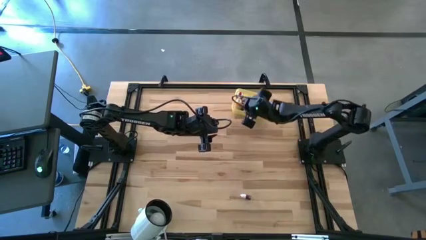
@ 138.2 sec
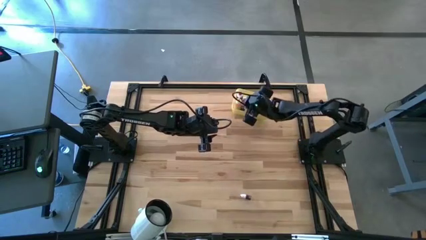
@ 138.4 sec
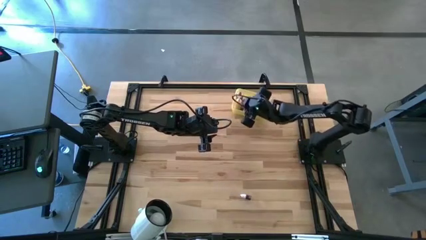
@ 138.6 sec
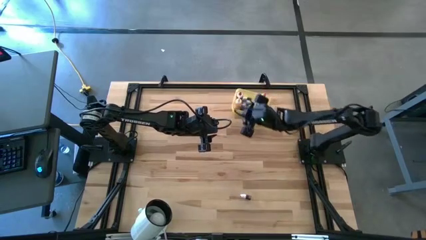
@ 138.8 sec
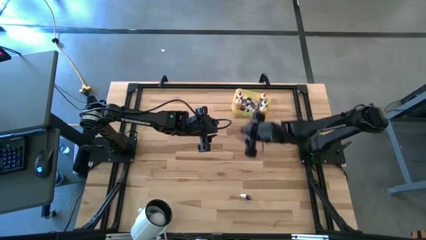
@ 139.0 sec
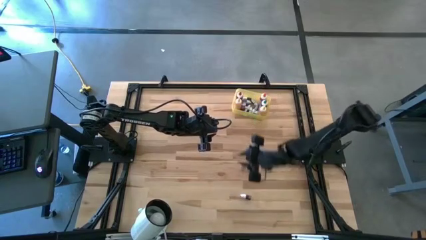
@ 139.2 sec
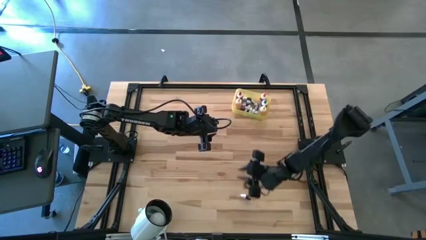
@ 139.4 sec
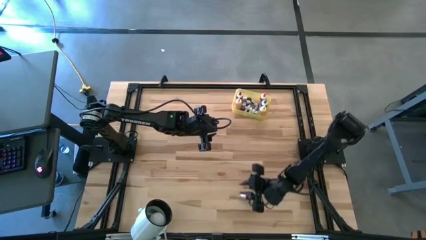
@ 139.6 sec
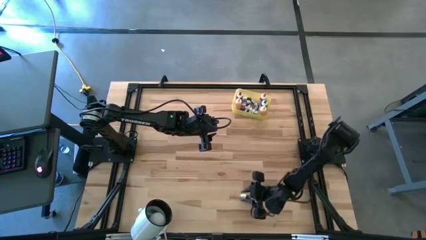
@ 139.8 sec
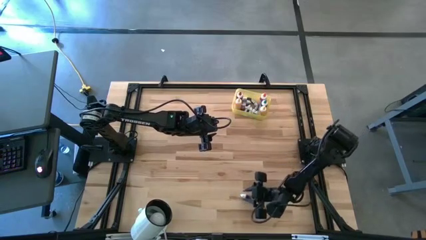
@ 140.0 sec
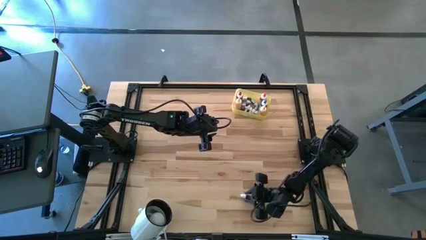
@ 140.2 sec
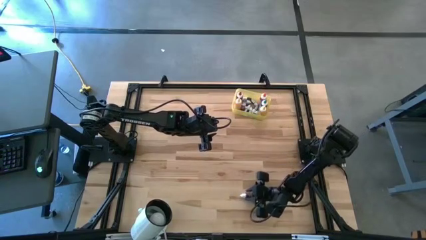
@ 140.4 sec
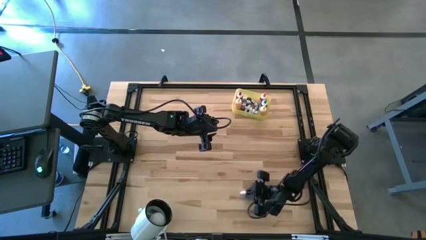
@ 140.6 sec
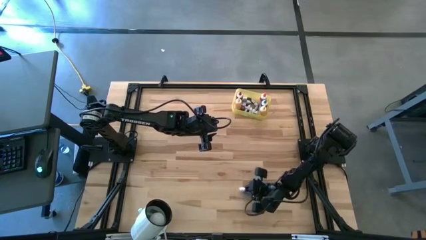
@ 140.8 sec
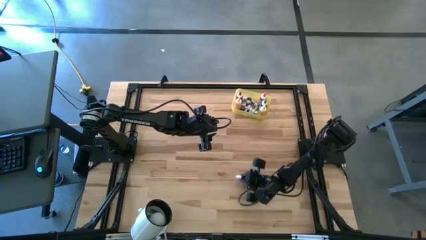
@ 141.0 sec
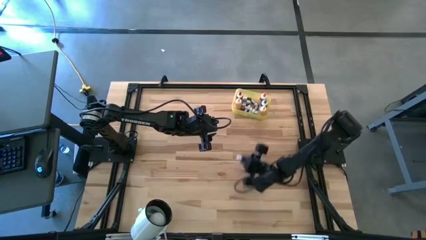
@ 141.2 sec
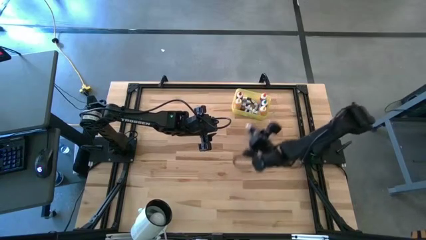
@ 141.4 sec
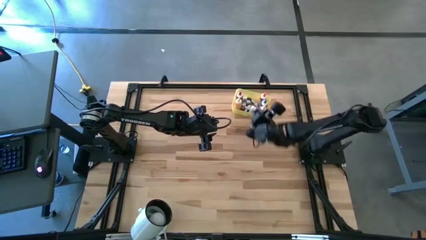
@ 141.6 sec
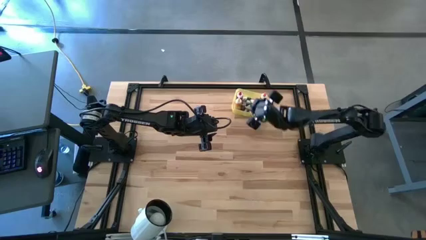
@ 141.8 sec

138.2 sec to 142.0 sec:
Task: Pick & Place food coloring
Put the small orange food coloring bottle into the yellow bin

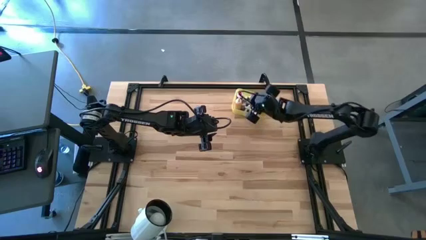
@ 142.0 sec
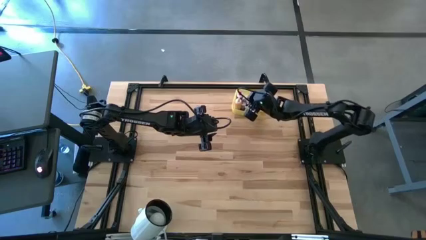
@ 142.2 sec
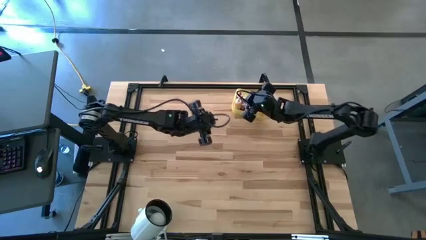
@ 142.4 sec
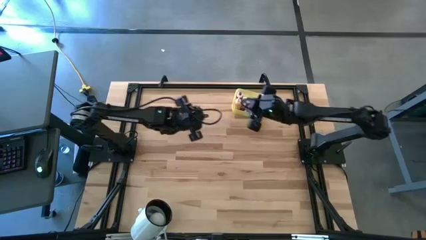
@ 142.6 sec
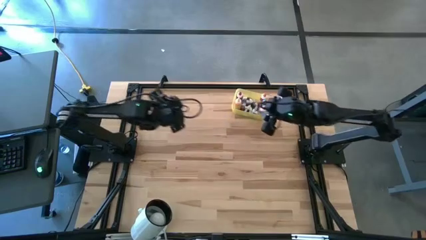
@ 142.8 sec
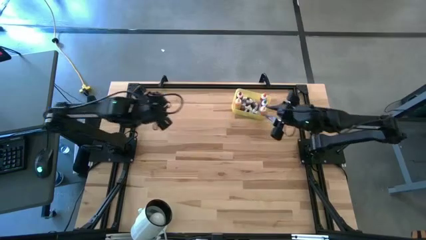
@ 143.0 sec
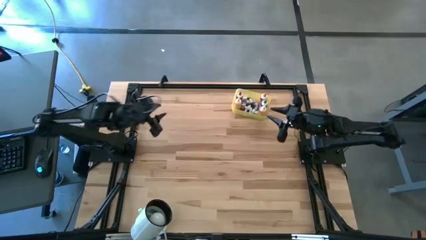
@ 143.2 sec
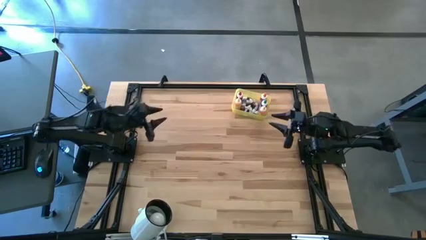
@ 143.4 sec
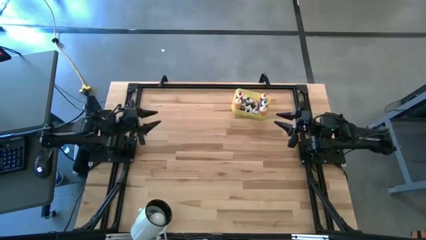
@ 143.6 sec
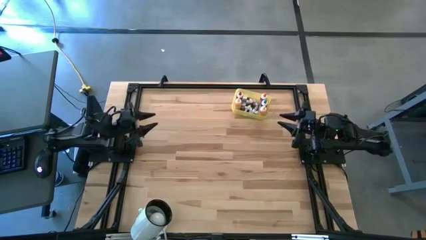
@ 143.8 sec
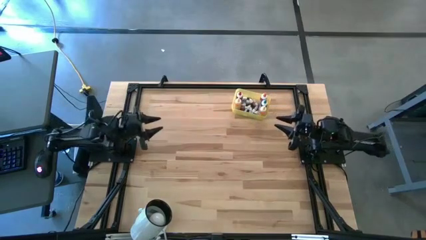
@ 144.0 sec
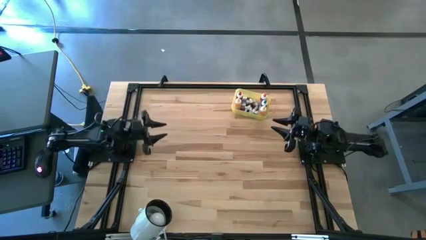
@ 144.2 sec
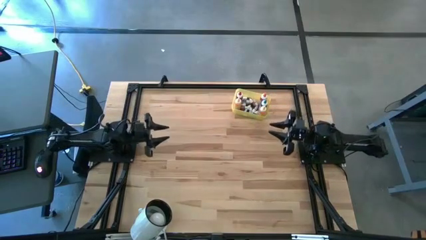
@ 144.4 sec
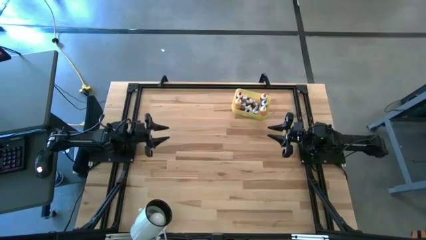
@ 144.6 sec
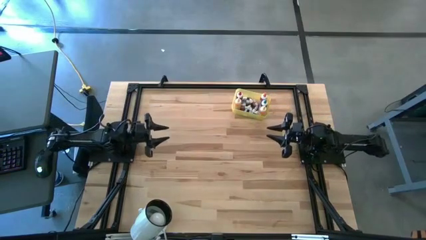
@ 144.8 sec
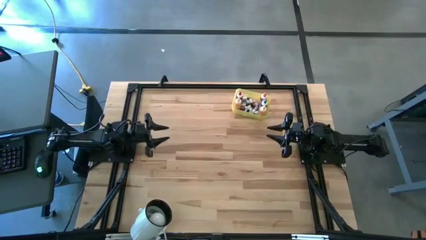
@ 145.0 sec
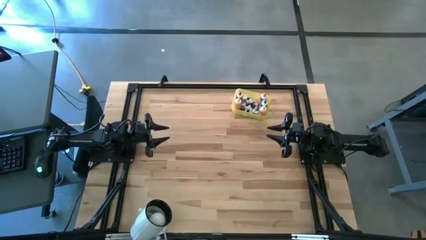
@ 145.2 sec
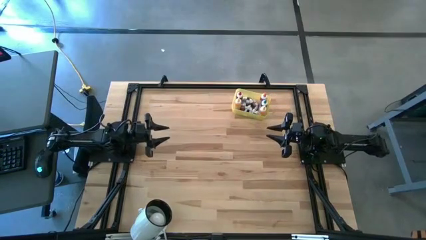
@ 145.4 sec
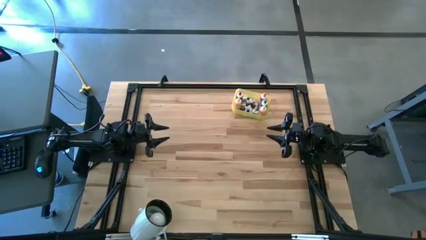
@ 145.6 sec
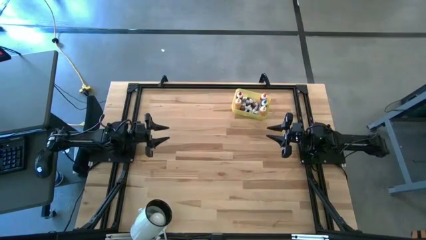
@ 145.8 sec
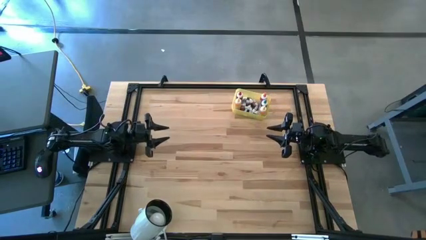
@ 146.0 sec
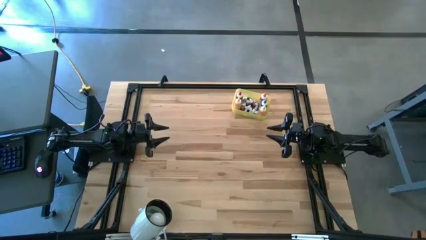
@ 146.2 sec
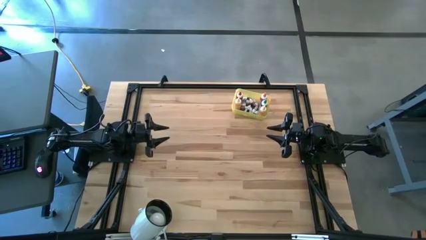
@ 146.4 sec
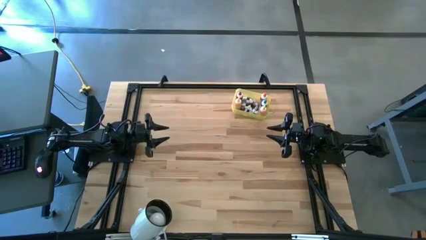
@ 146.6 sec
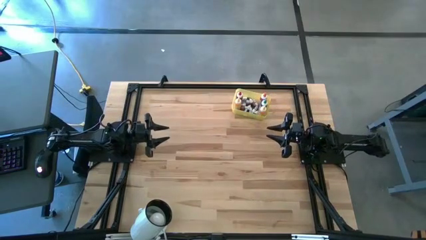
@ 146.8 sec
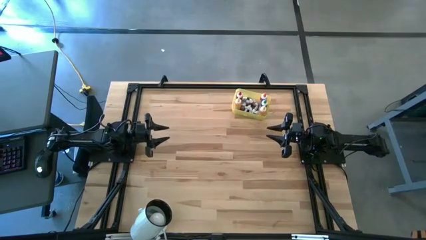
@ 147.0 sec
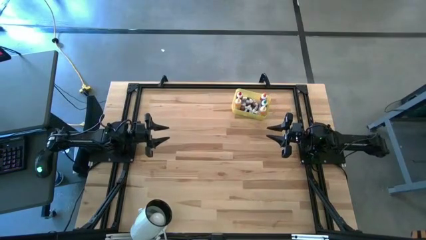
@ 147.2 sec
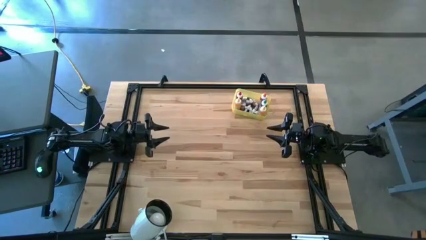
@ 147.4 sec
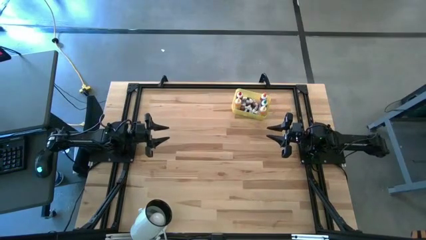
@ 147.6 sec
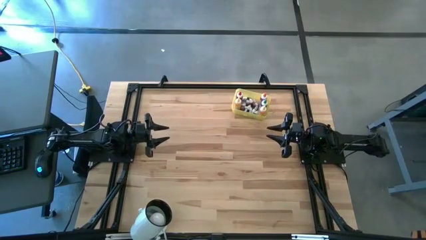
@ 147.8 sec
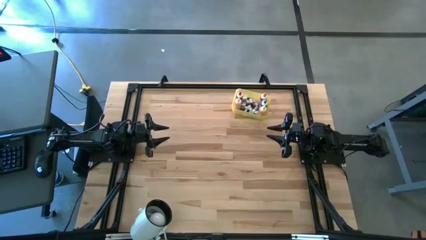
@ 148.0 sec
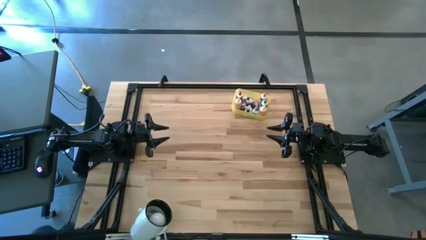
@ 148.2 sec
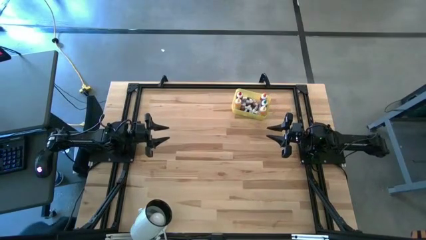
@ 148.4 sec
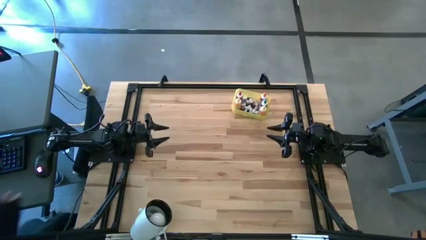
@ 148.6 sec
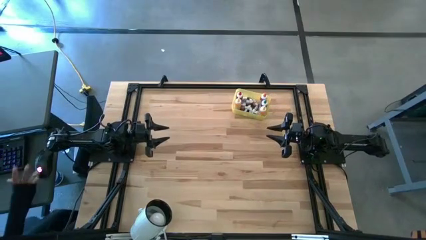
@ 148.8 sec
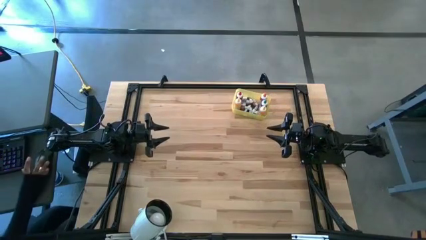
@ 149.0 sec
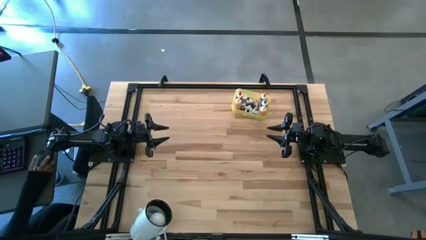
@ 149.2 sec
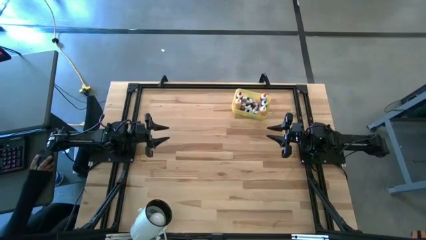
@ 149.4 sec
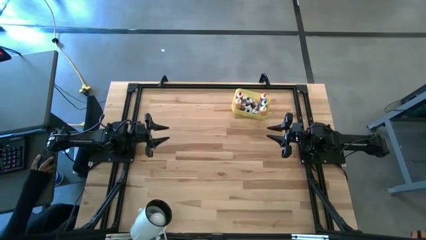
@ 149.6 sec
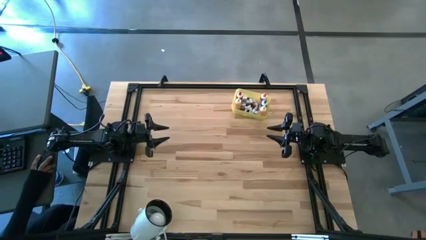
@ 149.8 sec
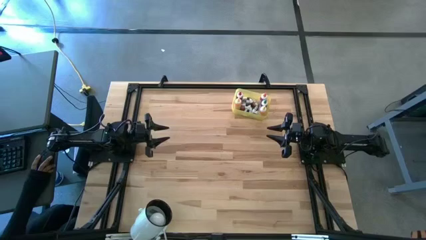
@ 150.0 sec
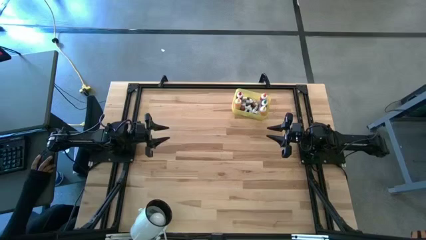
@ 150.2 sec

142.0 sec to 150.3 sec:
Return to Home Position

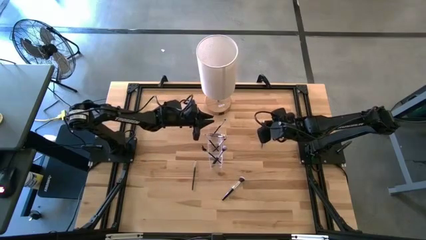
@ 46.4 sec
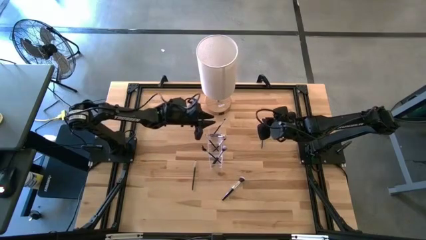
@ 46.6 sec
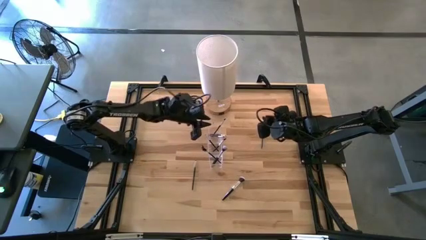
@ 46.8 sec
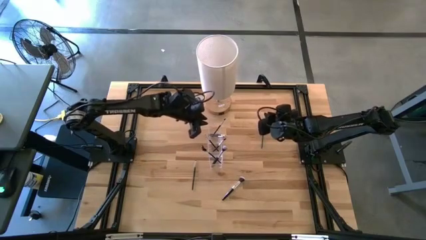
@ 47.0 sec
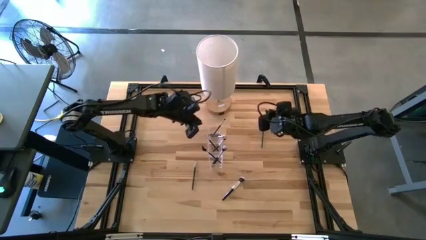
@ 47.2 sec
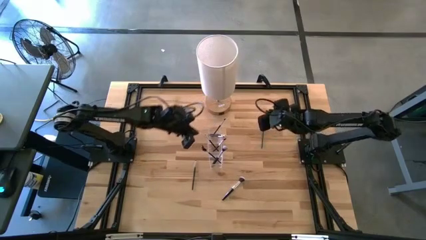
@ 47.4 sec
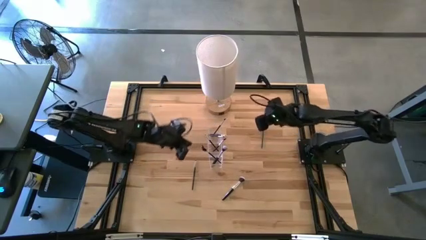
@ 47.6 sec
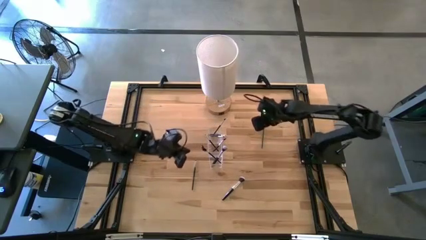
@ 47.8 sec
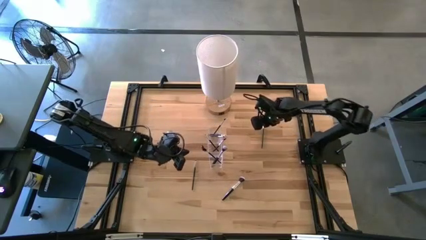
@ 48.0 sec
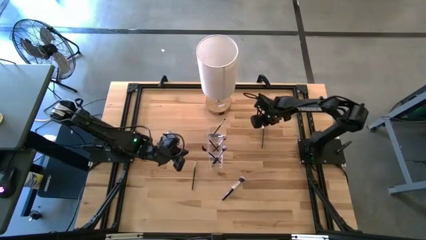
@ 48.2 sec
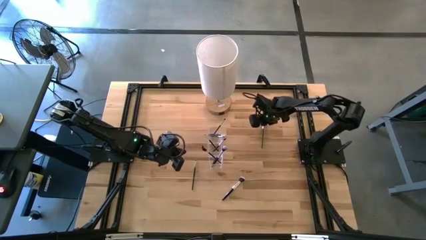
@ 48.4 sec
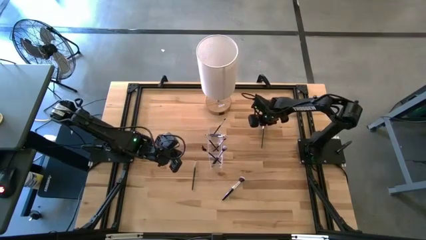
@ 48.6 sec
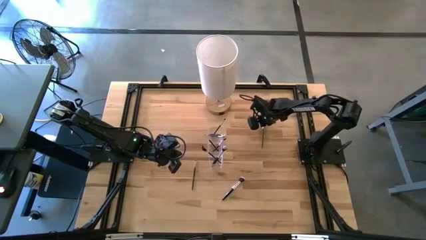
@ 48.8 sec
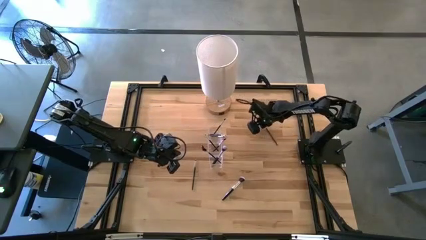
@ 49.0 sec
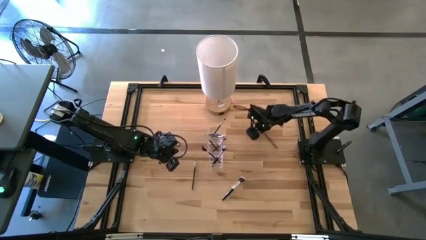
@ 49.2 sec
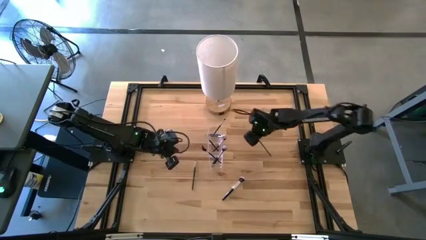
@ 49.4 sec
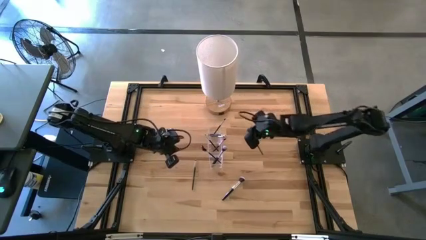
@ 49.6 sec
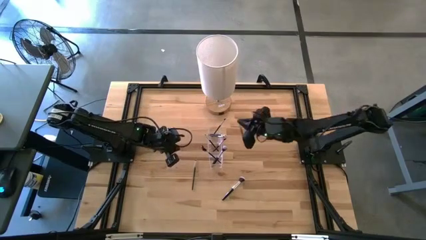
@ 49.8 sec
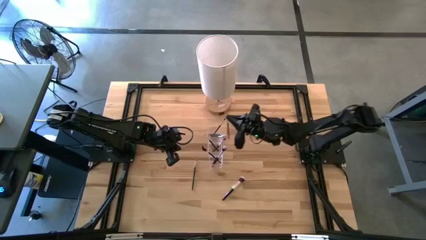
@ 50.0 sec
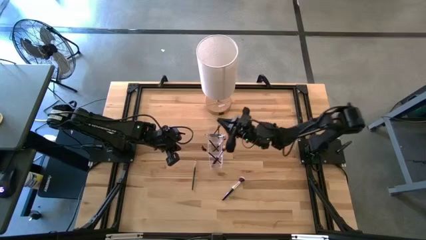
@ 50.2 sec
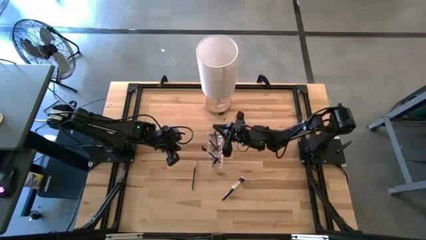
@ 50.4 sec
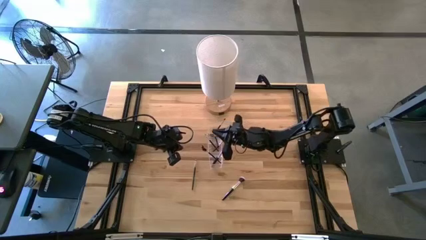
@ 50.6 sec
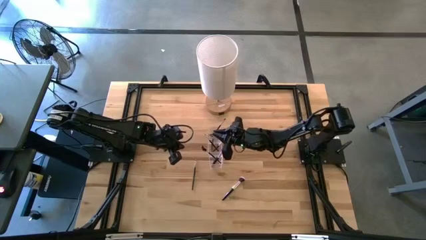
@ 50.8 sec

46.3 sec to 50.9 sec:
Task: Put items in baskets/containers
Put the black eyeshadow brush into the transparent organizer
